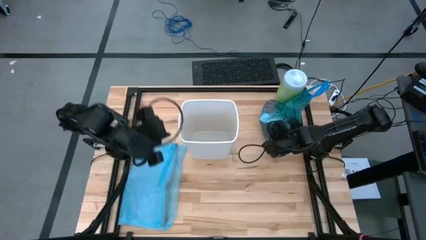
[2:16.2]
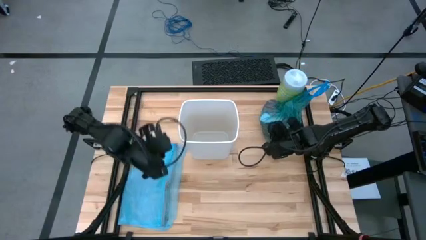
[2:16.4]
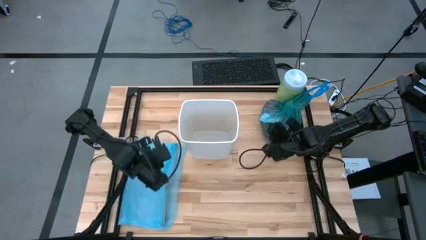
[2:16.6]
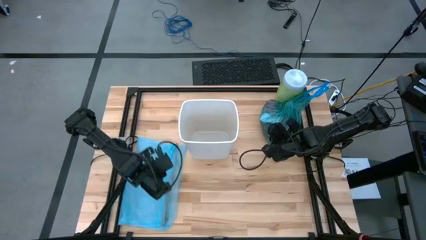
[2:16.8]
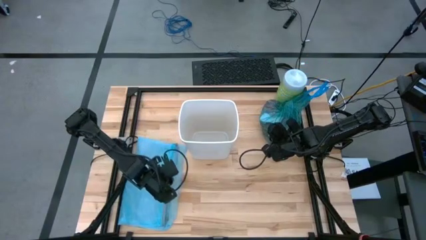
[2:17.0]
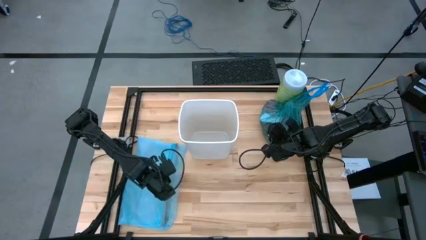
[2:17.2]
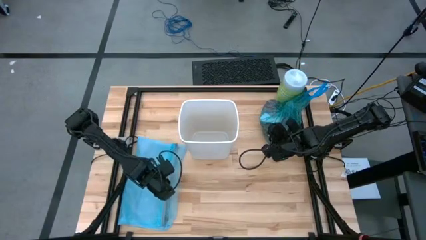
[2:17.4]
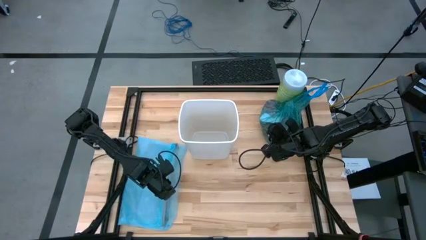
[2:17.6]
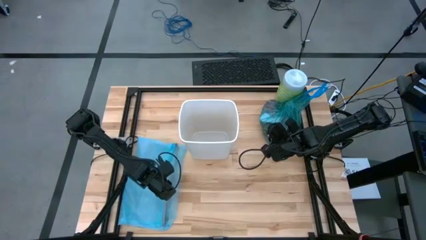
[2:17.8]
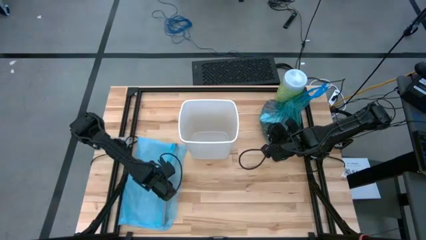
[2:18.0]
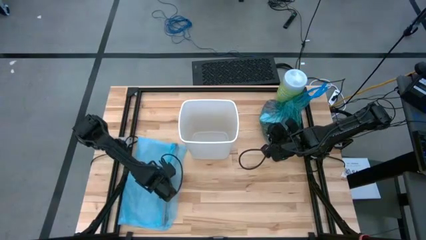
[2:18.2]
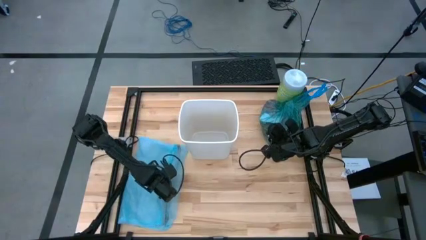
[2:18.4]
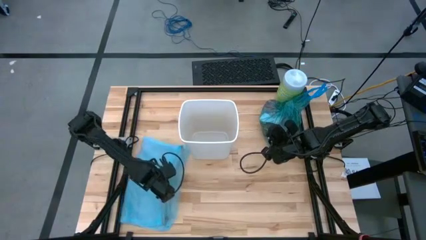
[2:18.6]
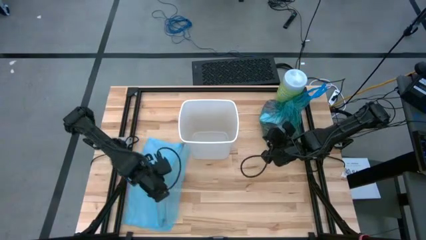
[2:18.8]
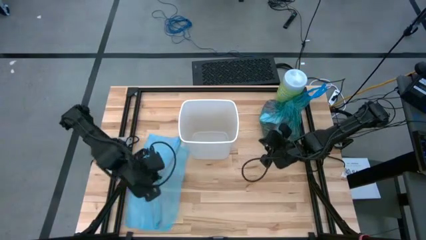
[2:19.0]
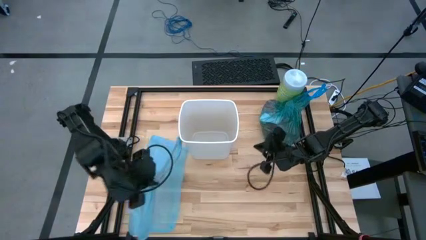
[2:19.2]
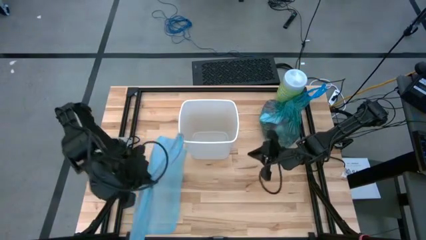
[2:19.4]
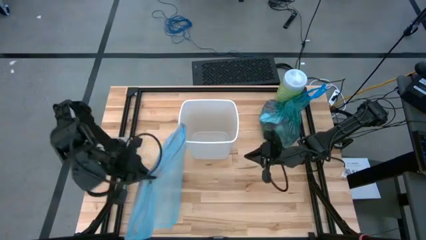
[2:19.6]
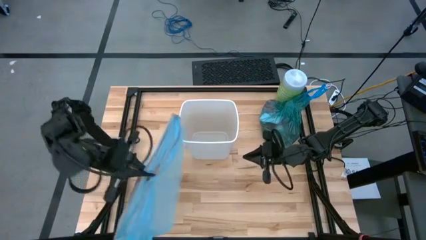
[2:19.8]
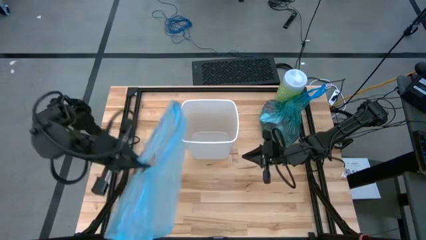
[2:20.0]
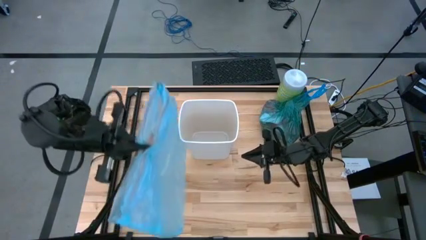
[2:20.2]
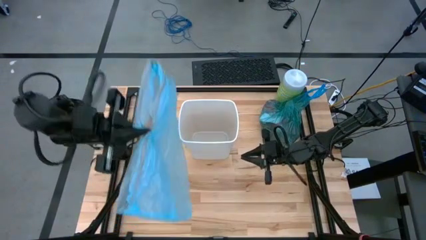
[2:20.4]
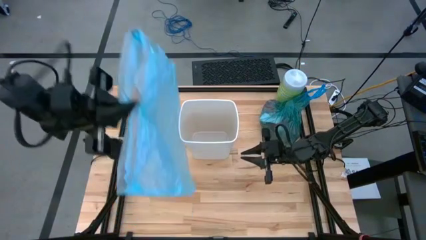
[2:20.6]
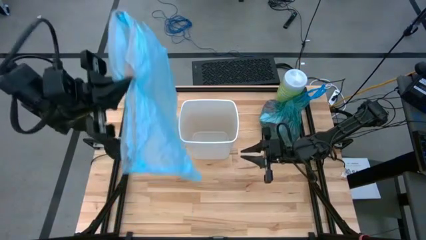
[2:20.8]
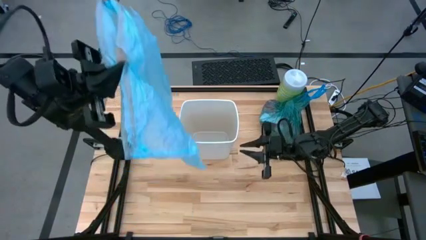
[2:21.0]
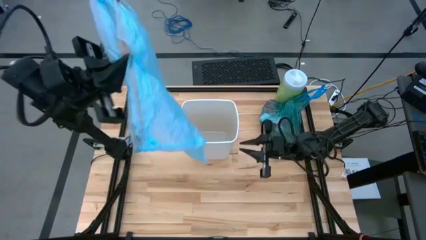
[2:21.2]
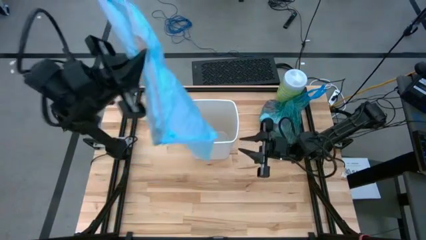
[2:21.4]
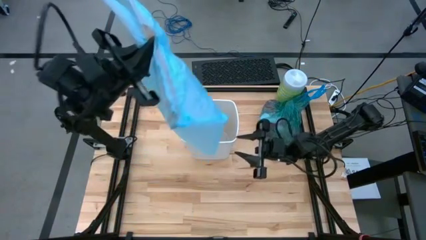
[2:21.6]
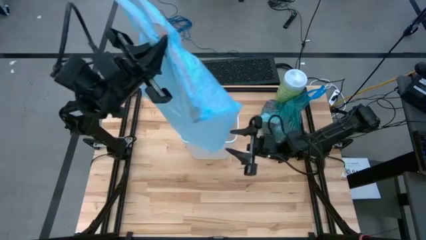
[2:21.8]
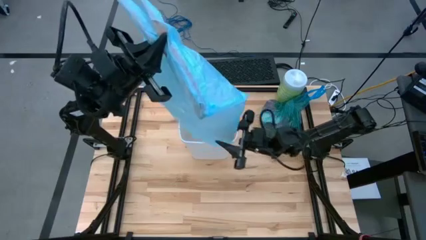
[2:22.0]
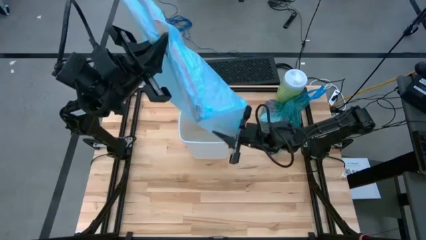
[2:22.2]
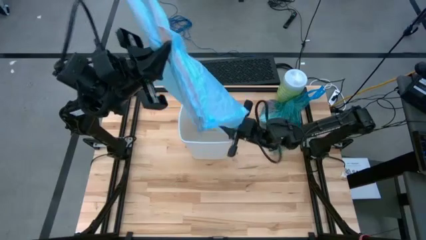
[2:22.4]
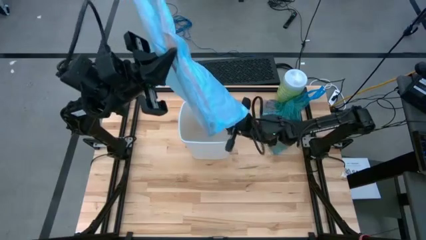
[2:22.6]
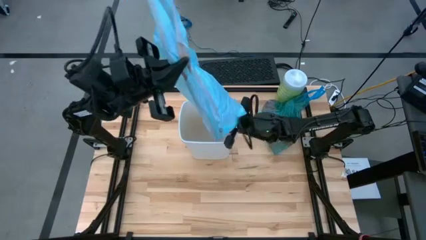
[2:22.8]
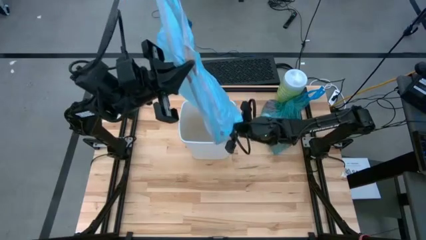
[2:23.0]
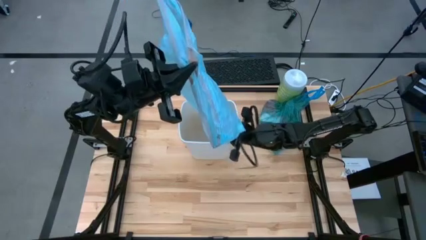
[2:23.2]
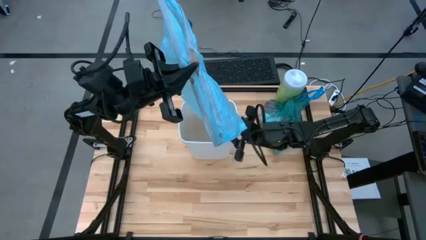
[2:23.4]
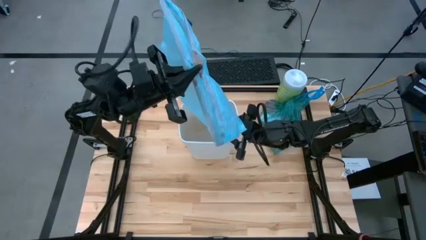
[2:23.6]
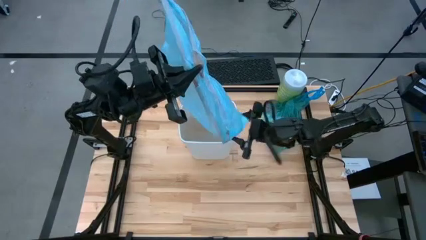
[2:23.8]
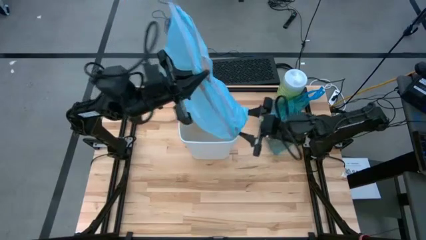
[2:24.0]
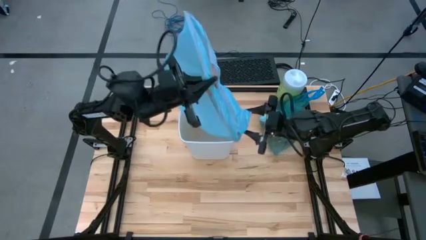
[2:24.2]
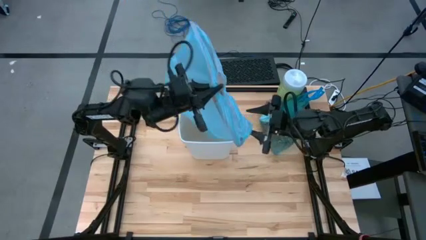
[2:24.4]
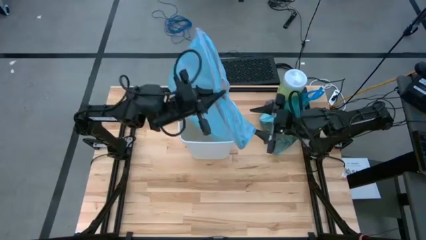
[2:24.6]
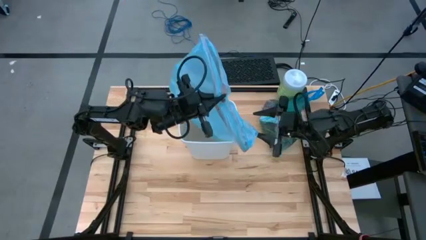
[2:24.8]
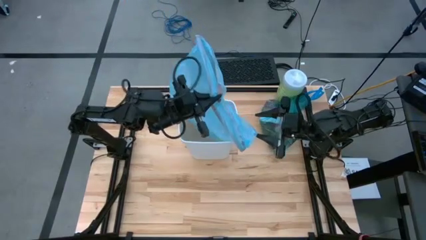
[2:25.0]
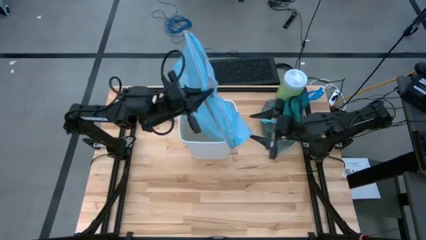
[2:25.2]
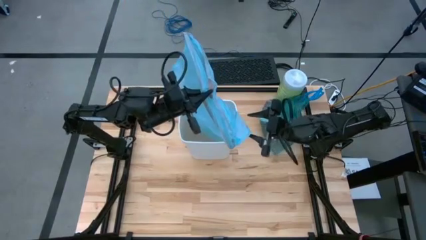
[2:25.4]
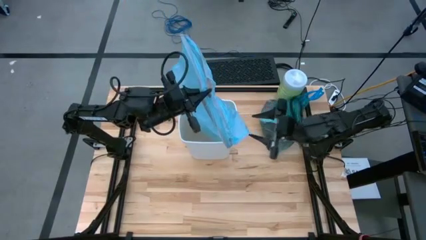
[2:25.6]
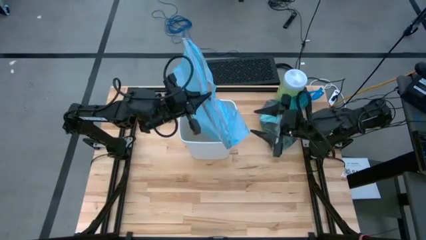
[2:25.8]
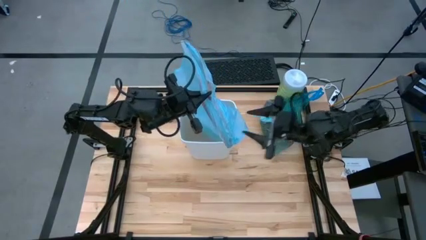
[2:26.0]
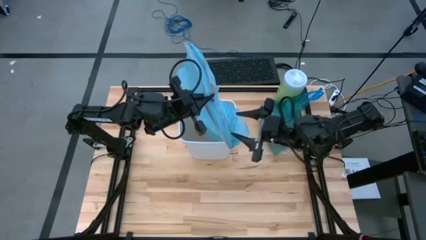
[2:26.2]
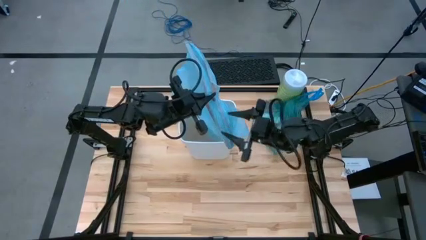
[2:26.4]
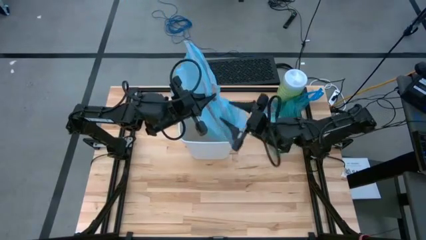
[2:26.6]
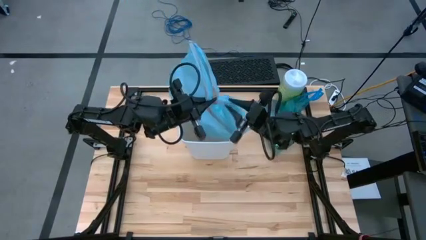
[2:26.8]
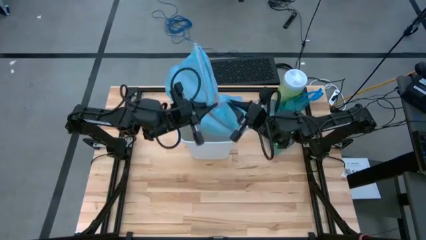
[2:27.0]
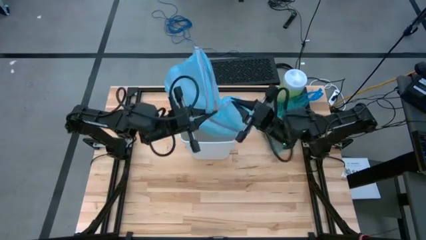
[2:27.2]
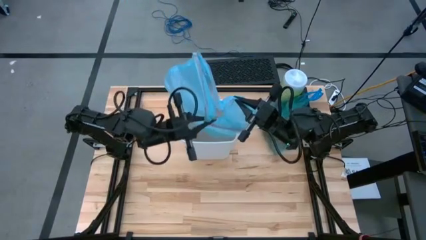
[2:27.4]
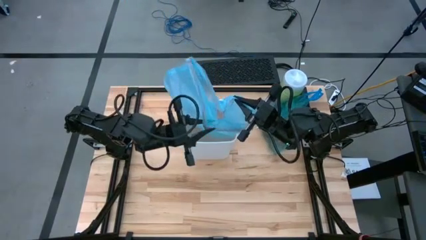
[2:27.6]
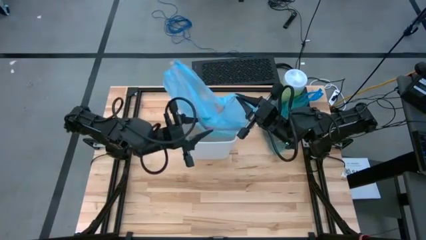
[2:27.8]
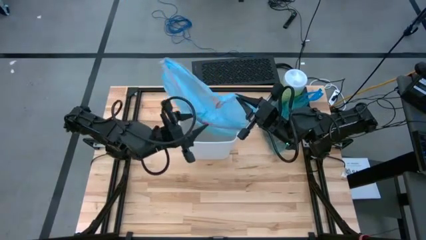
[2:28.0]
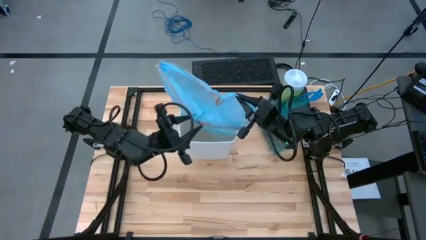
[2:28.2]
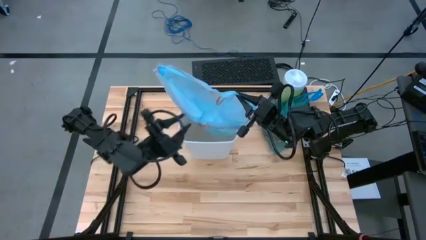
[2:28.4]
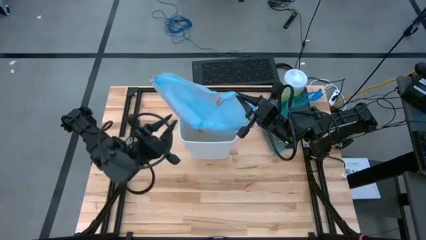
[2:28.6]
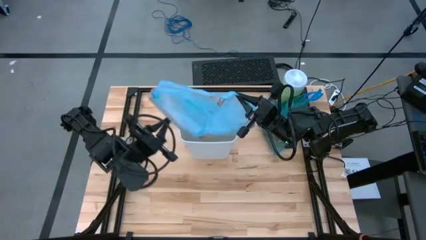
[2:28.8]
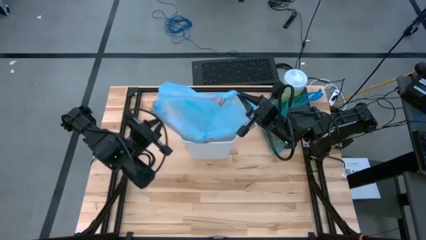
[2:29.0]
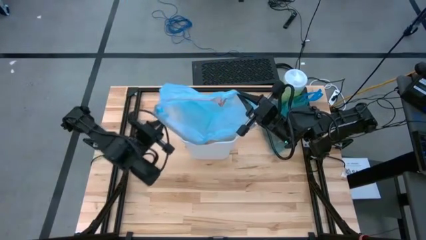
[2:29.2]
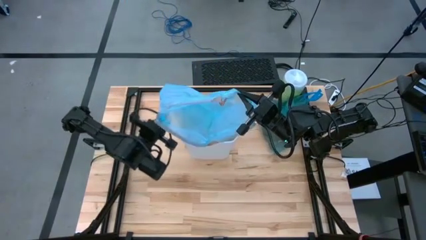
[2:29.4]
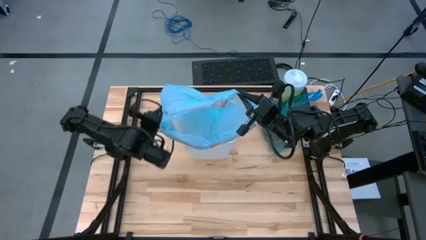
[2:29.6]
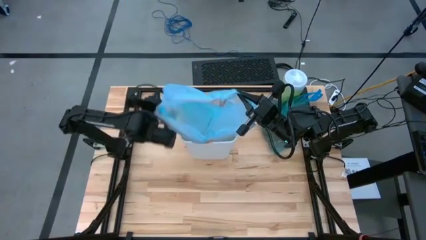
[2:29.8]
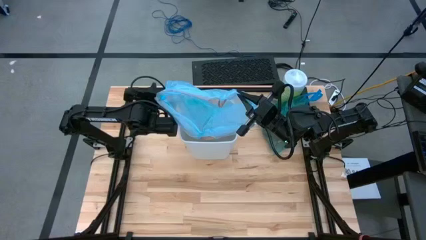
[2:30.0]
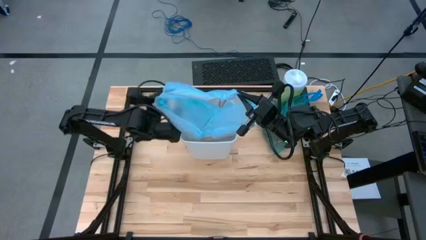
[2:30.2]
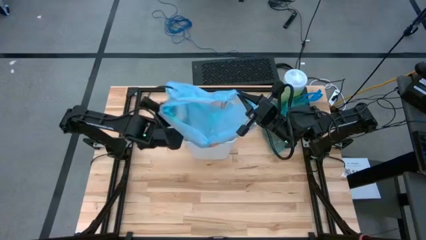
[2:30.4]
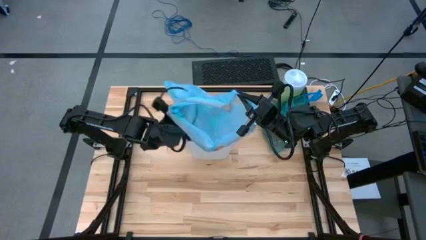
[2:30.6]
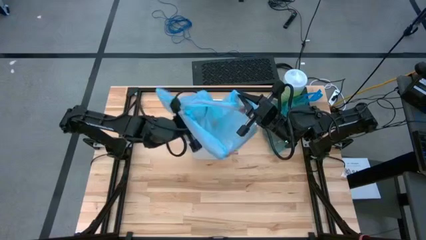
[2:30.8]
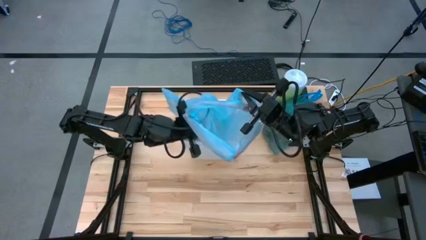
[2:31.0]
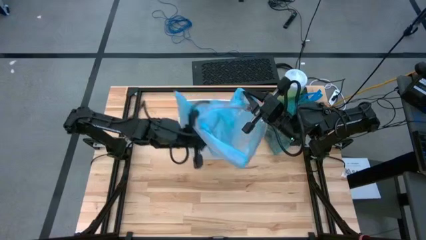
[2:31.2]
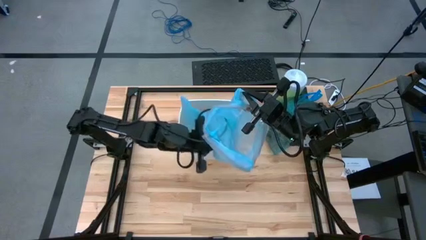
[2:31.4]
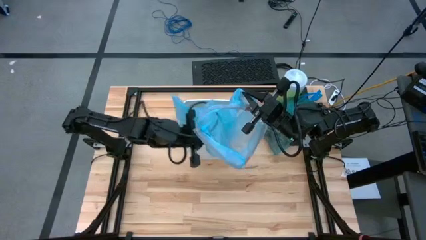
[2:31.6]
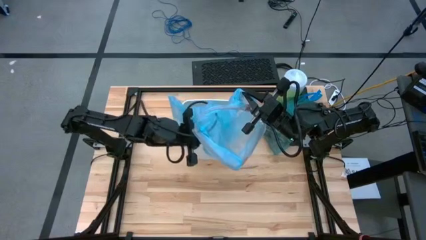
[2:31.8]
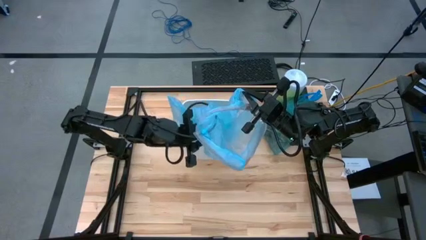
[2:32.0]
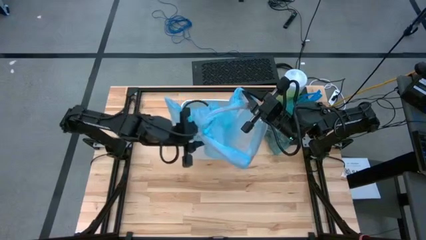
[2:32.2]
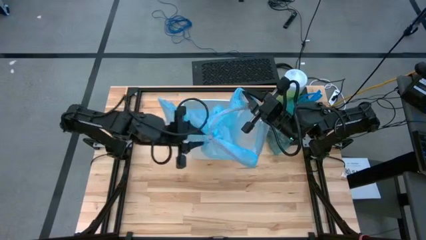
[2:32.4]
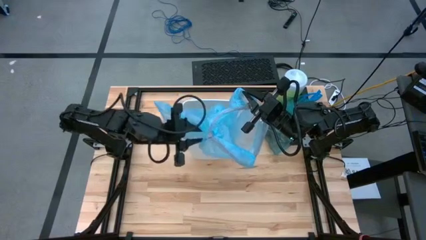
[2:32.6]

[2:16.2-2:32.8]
Task: place trash/remove bag and relplace
Put the new blue trash bag inside the white trash bin

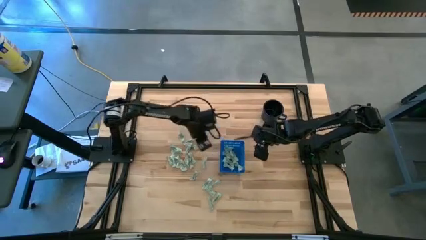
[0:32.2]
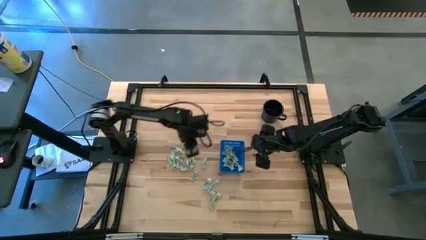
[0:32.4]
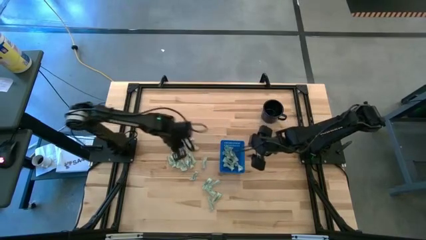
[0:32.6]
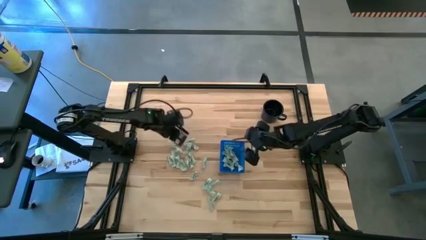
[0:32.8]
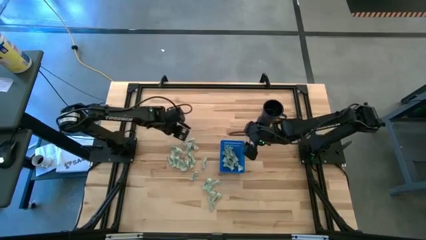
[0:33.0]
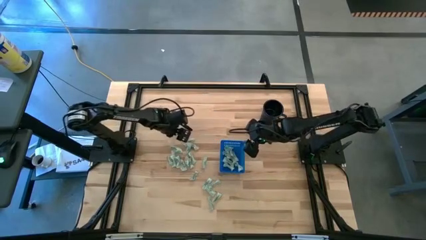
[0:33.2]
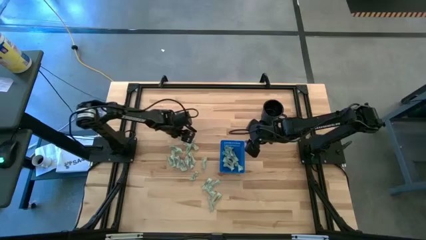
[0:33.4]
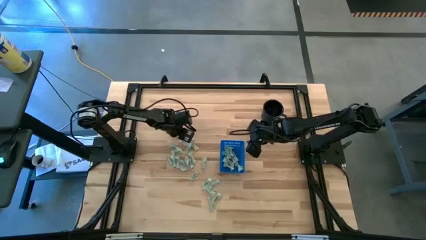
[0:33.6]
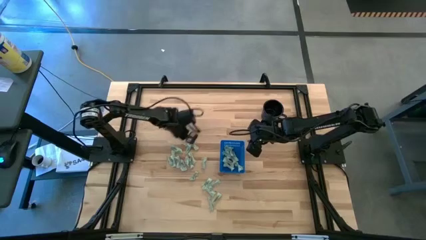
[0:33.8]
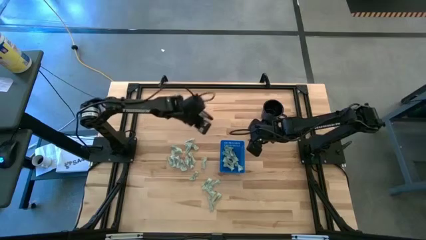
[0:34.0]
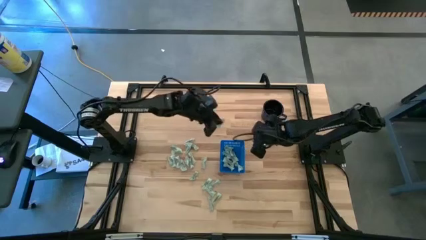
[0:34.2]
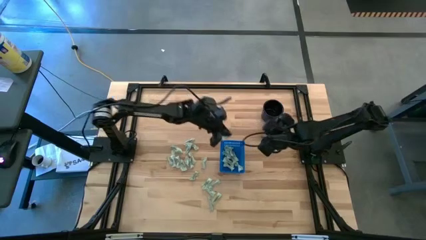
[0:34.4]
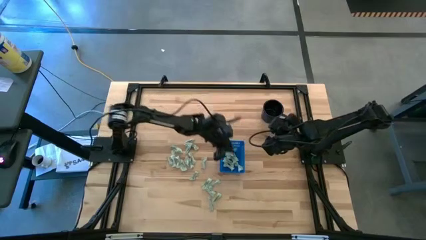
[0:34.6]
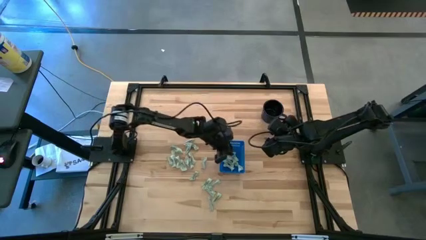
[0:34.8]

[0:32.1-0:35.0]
Task: Pick and place Stevia / Truvia into bins
Put the stevia packet into the basket
